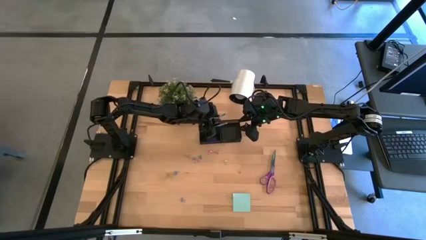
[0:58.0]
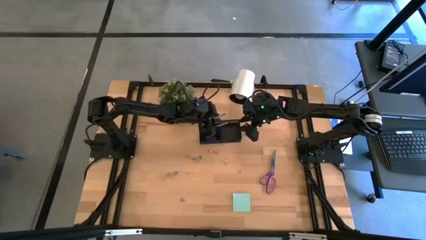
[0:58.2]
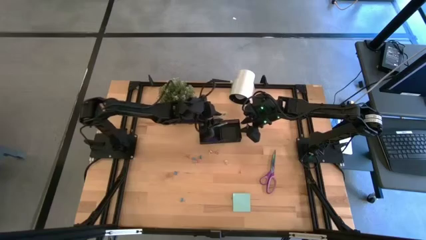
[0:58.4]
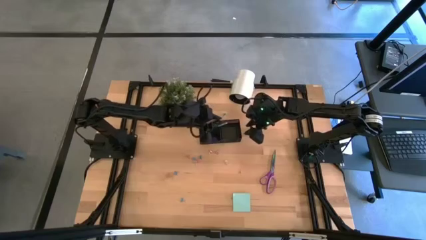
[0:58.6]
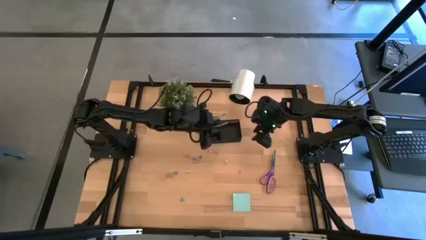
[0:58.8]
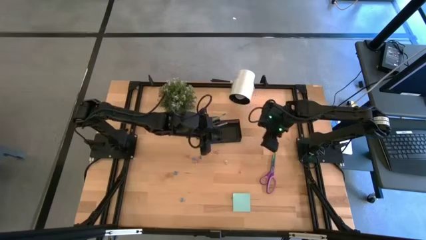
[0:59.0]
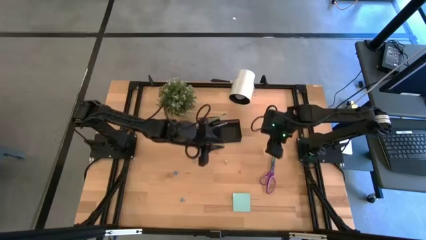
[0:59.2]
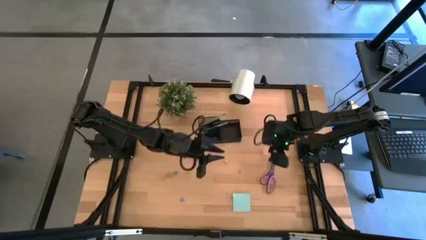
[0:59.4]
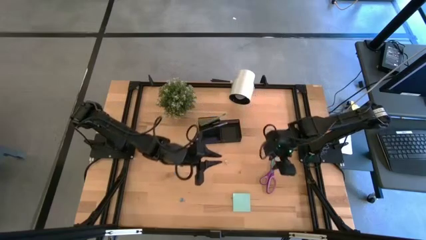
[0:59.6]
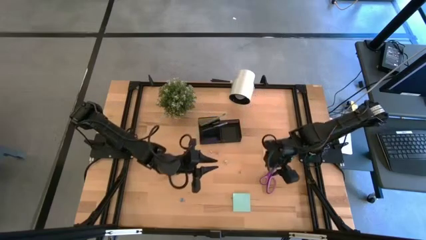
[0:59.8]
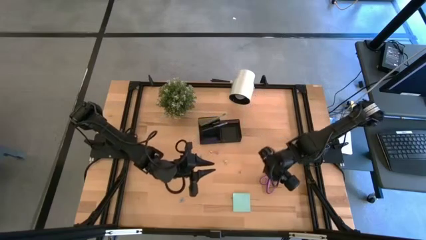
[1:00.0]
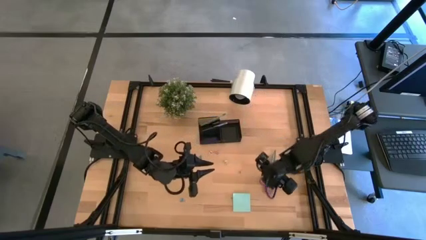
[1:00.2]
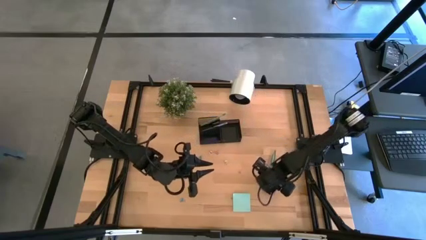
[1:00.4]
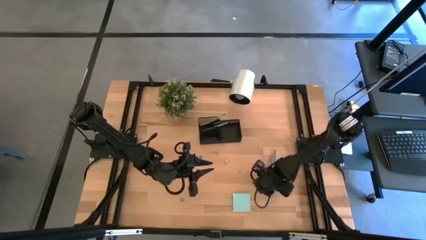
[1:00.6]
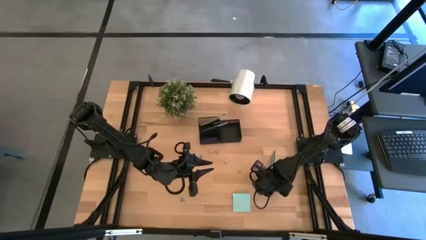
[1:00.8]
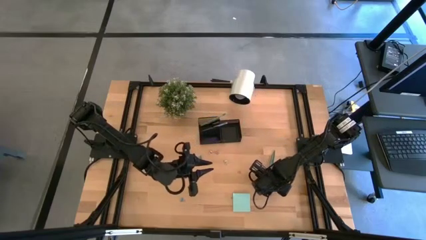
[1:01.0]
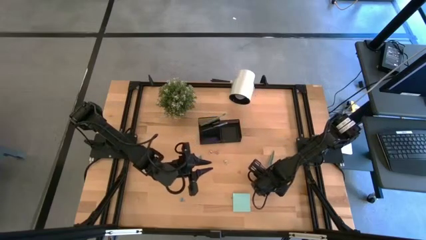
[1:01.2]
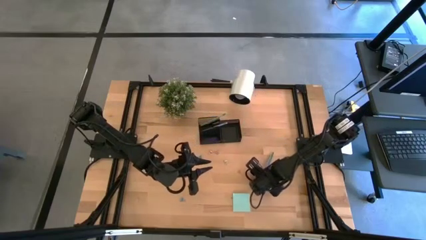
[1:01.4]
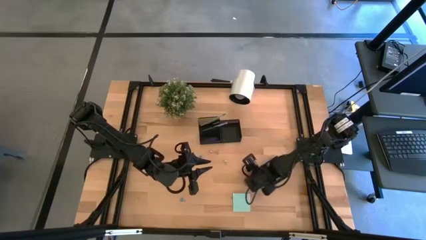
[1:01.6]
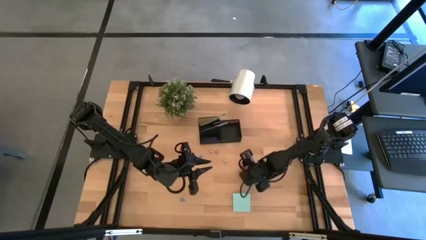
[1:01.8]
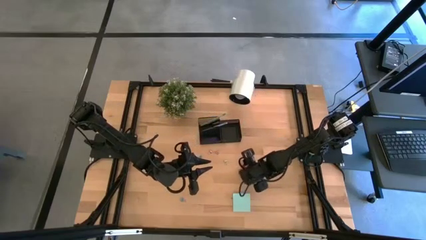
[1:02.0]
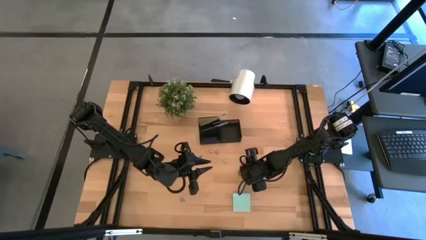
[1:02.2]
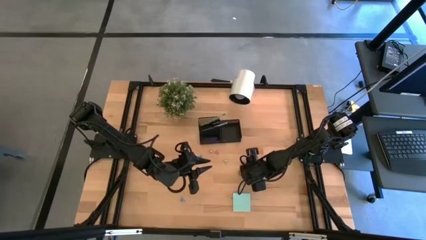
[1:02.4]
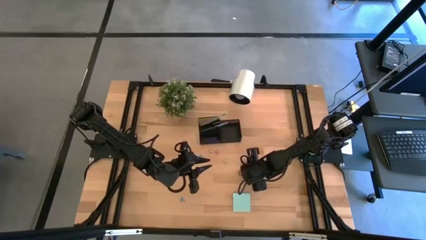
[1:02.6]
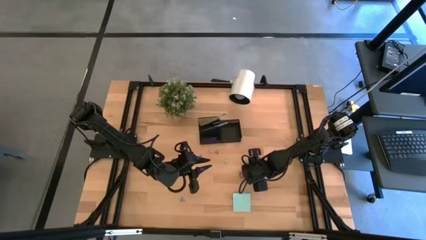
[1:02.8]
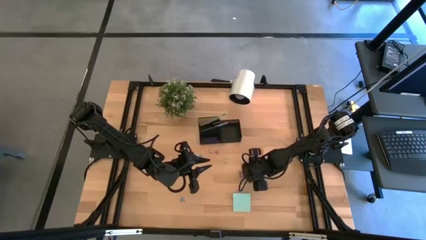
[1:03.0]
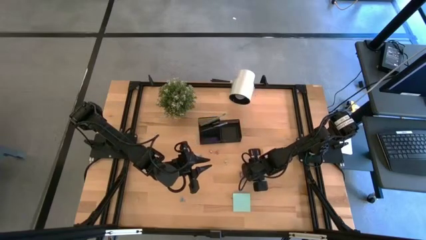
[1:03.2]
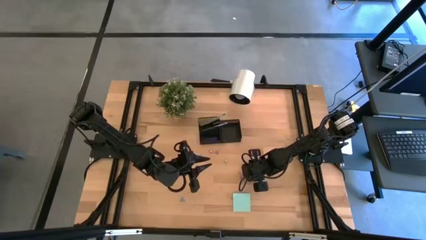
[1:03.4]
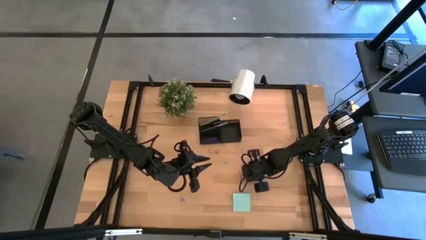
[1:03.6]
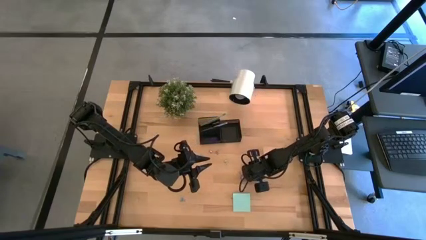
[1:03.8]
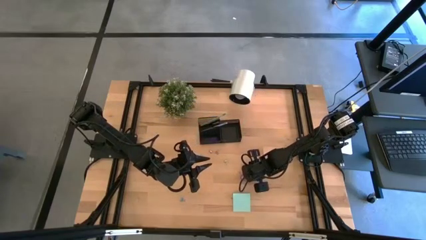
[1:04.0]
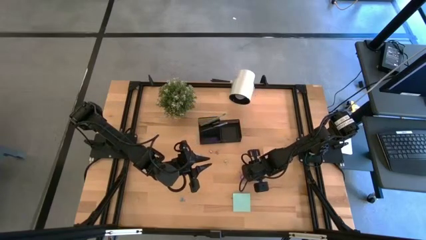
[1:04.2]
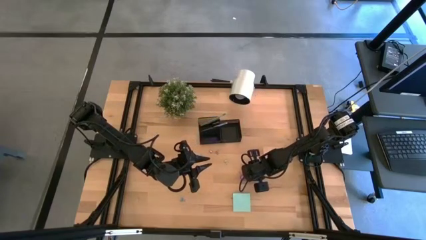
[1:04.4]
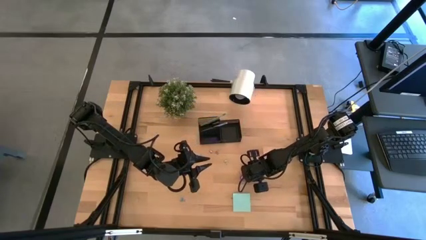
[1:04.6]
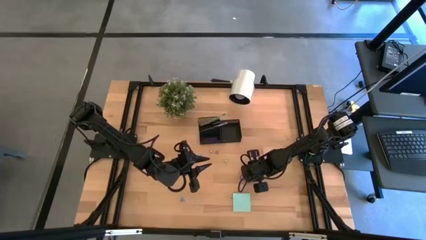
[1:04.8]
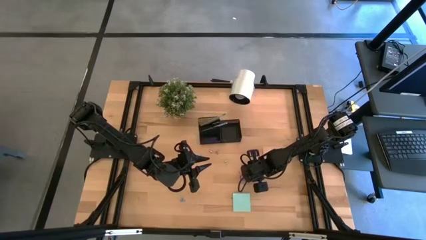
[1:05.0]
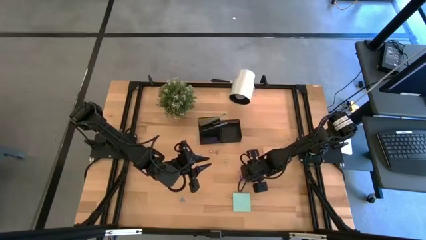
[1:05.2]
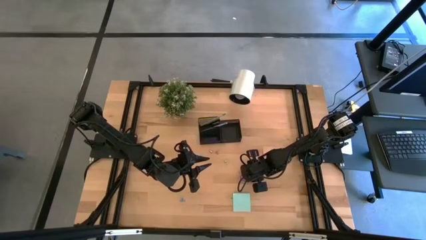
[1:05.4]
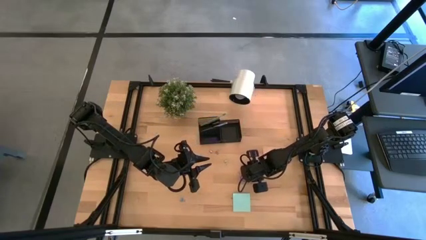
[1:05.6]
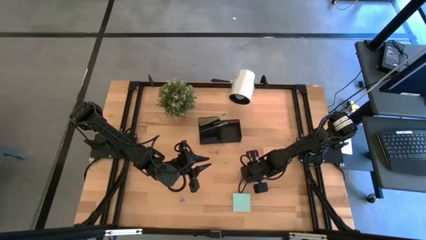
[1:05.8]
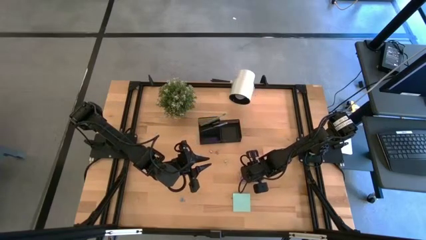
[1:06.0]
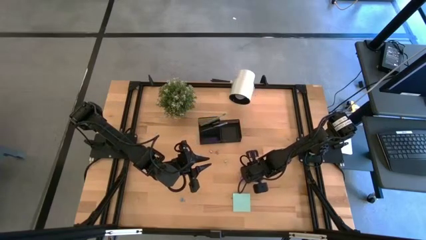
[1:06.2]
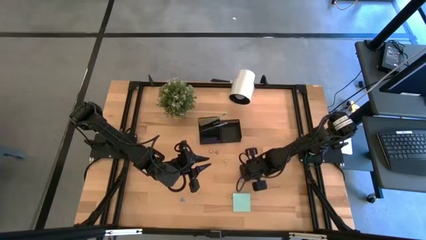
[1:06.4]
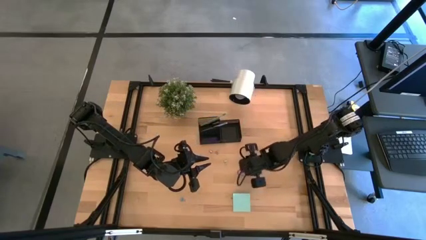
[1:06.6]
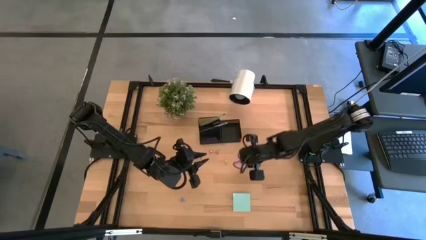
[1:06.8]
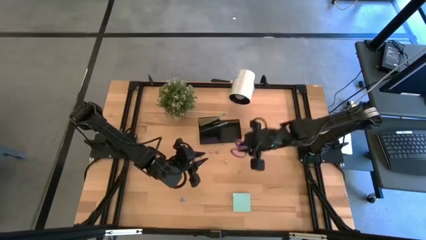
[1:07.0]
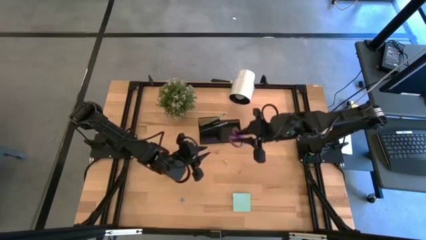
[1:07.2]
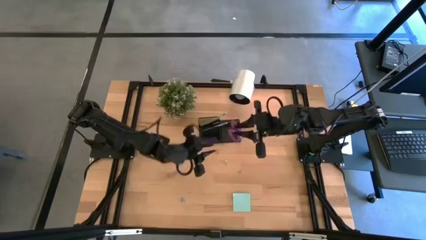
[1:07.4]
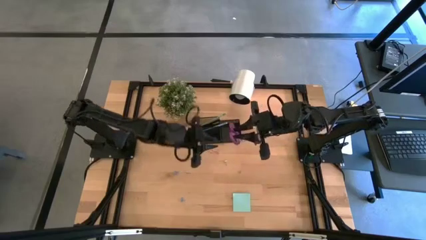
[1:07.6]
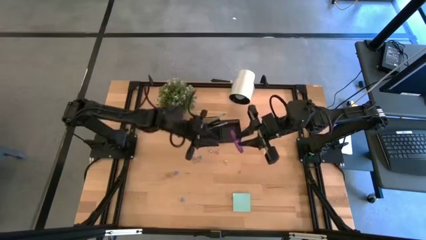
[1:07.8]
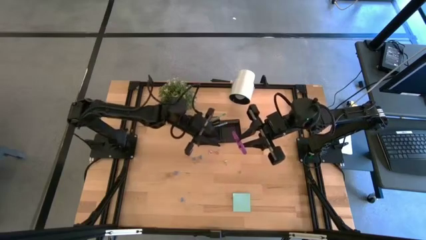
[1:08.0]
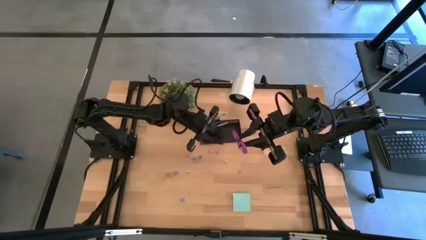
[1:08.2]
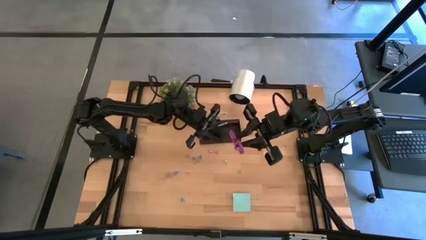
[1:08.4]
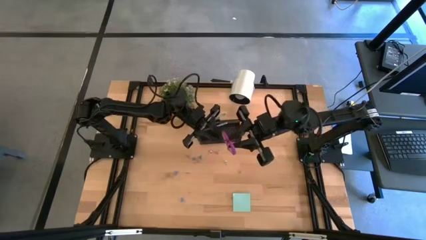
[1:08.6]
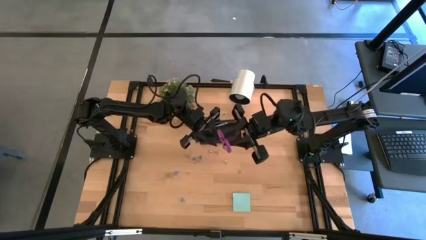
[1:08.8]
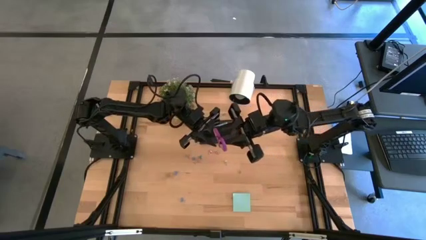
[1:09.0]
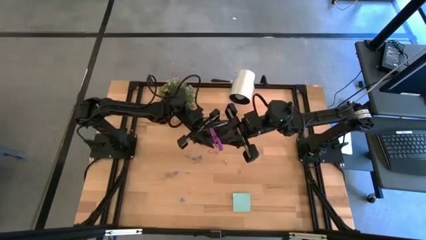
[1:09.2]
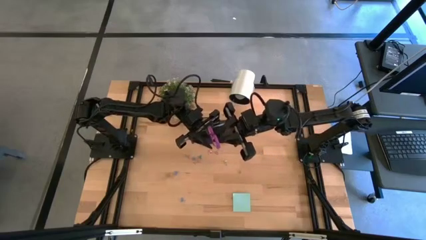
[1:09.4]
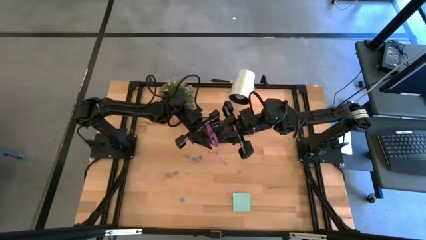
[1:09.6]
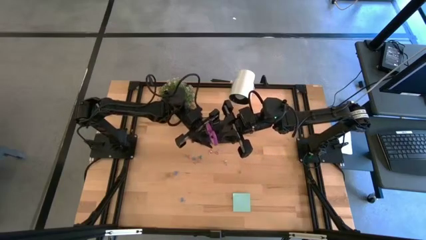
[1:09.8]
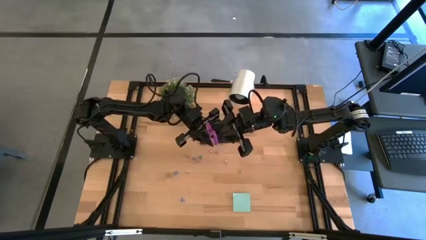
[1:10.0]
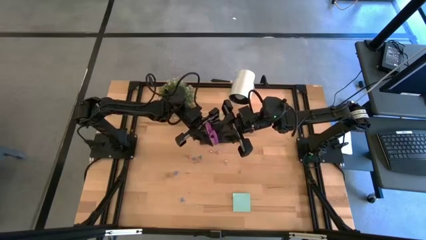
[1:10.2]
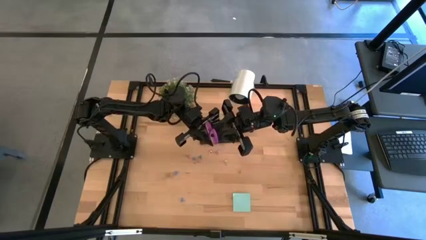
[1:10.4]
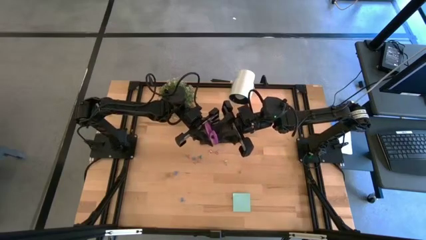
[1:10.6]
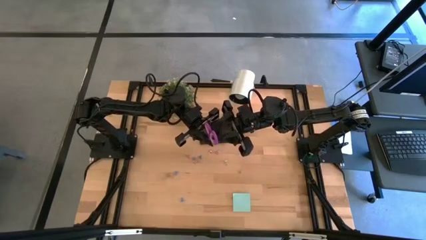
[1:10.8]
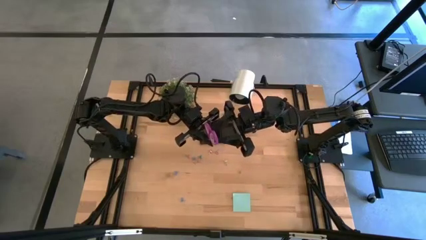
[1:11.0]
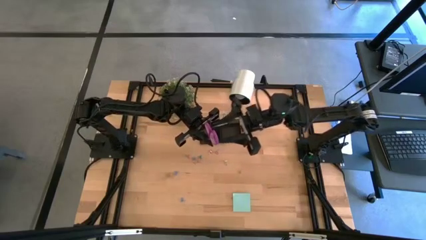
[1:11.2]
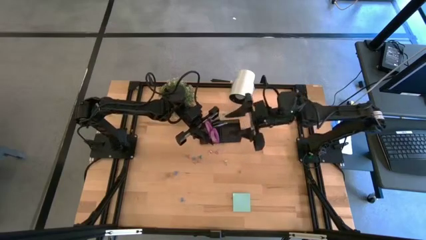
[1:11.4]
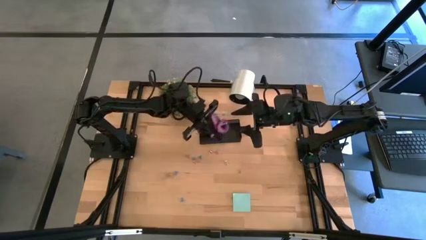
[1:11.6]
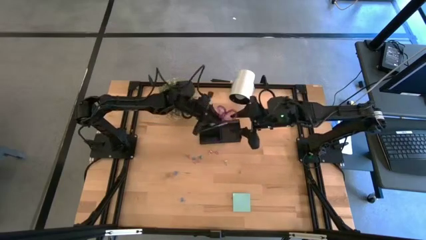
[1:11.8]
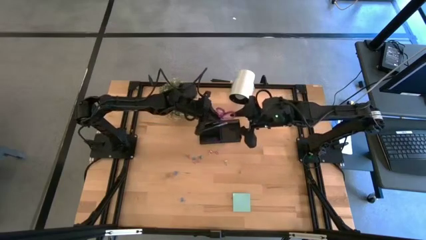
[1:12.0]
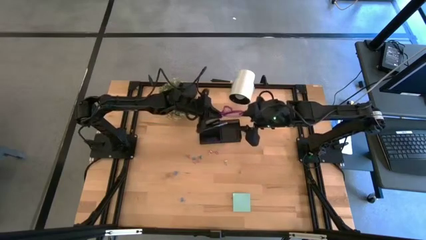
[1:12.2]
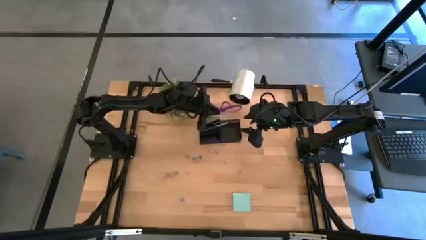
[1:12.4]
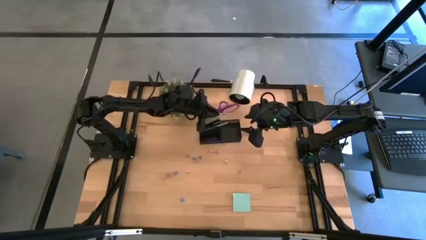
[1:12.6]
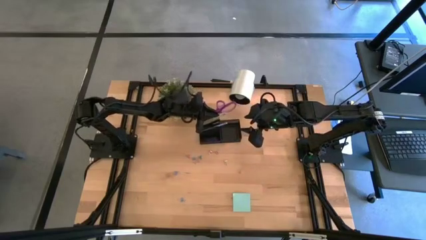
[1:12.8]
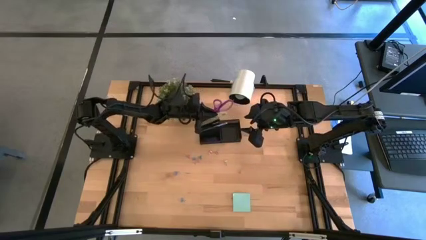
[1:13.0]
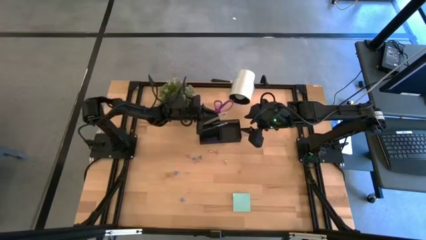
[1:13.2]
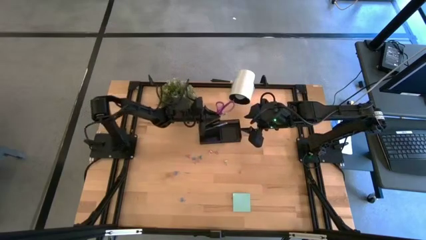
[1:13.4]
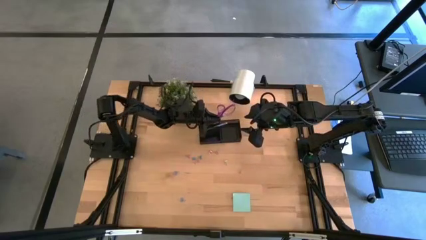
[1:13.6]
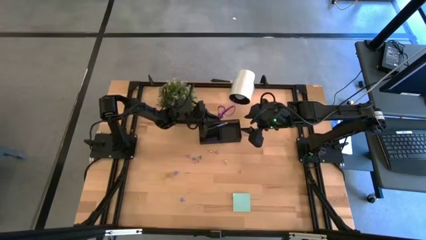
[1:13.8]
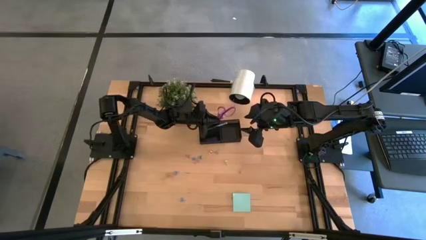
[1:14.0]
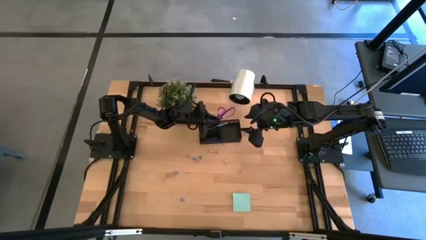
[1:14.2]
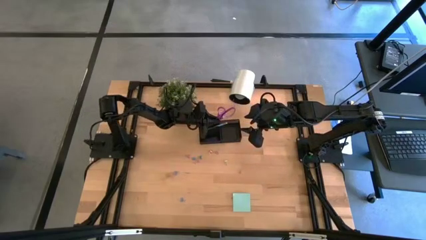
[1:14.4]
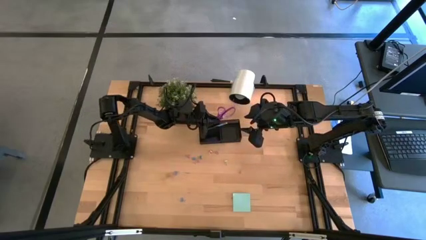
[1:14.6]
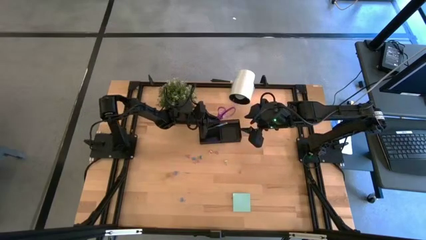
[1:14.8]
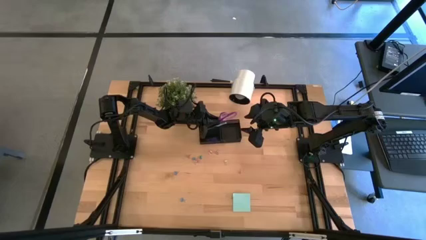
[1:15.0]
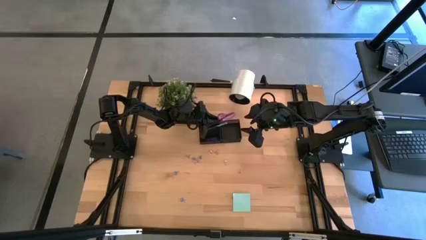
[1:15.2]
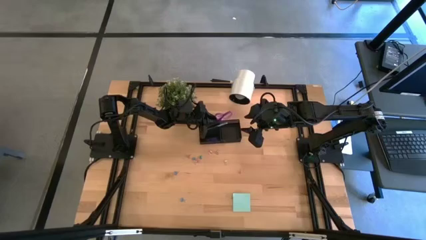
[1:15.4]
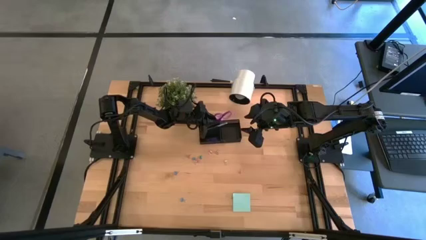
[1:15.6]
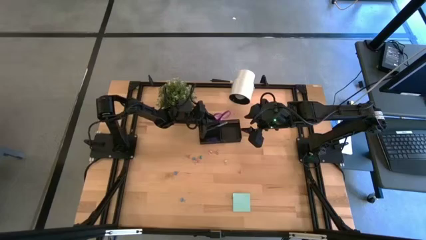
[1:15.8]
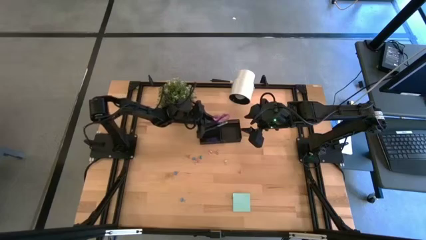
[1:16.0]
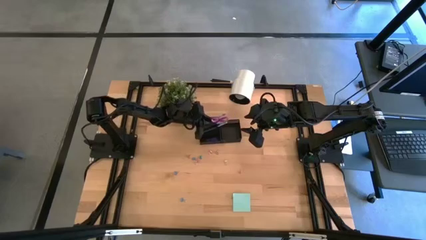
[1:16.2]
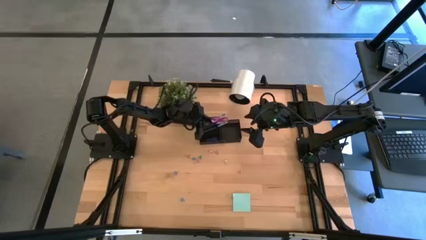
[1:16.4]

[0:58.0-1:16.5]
Task: Pick and place office supplies into organizer
Put the purple scissors into the black desk organizer
